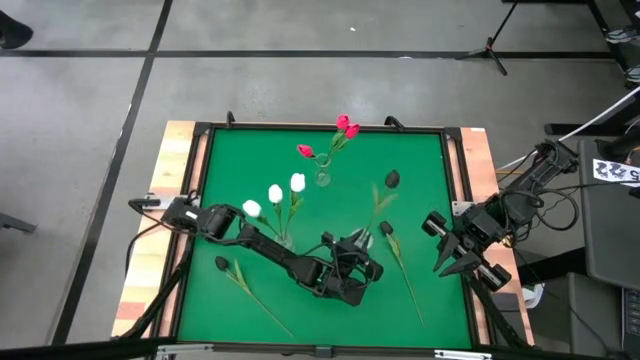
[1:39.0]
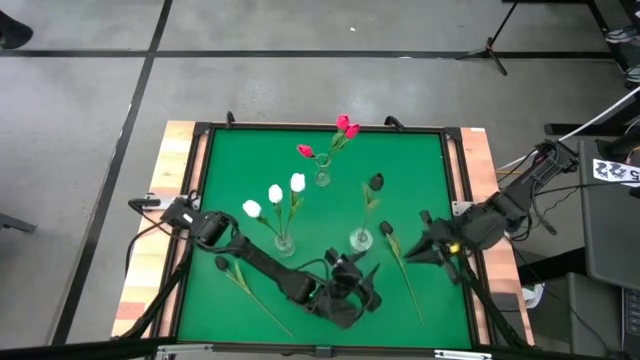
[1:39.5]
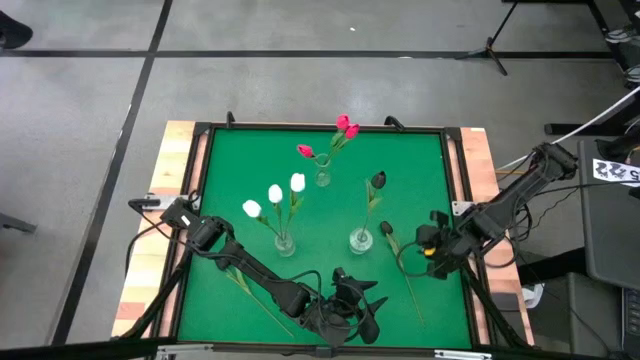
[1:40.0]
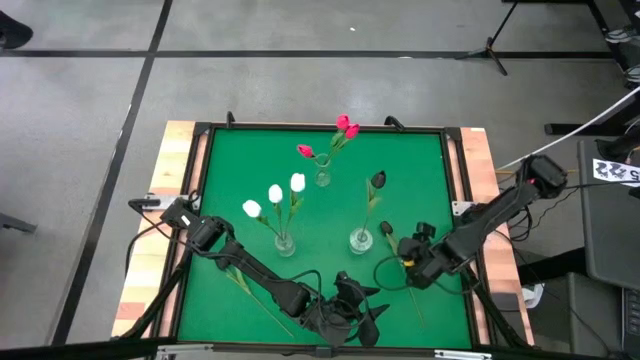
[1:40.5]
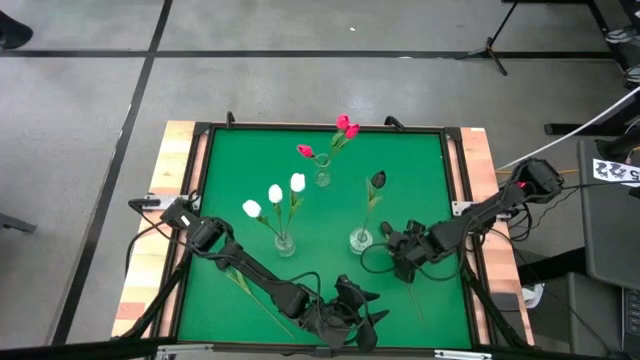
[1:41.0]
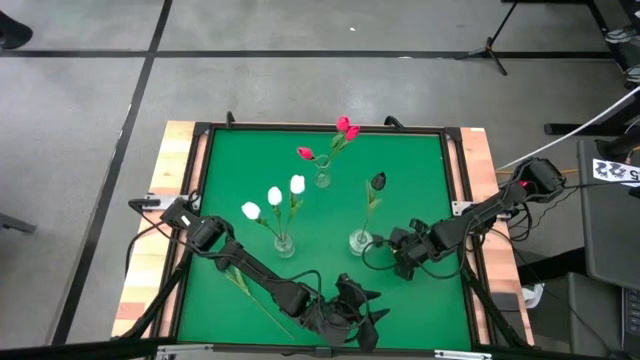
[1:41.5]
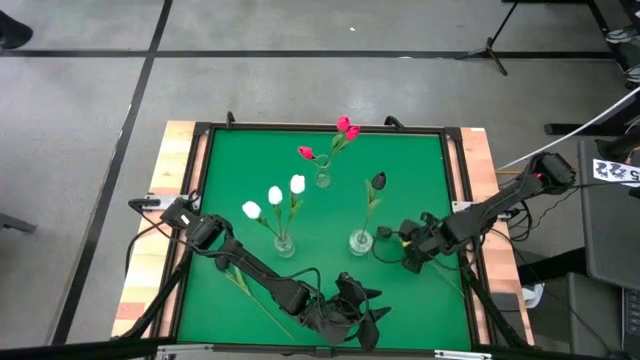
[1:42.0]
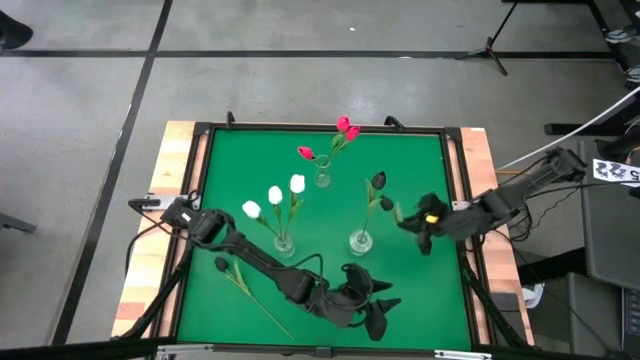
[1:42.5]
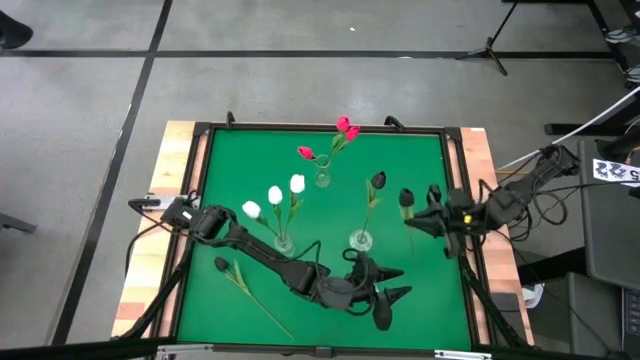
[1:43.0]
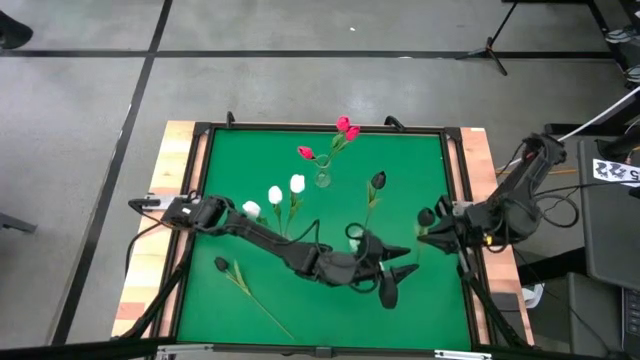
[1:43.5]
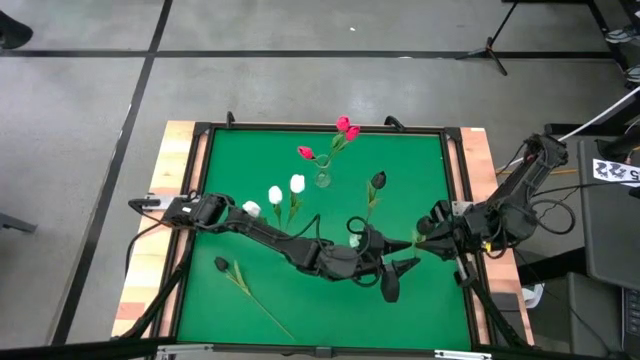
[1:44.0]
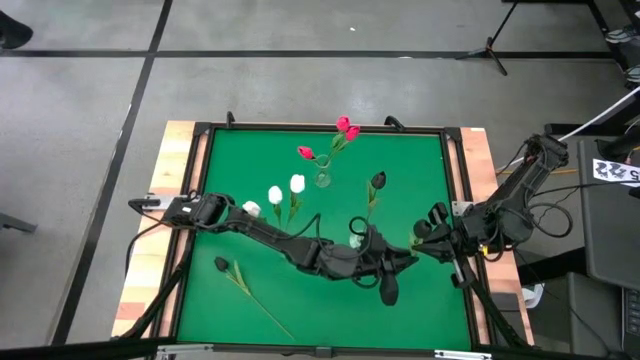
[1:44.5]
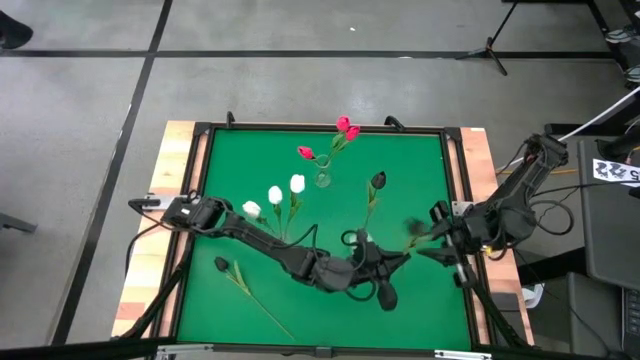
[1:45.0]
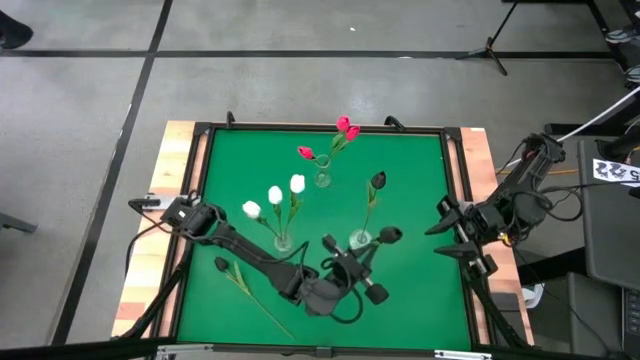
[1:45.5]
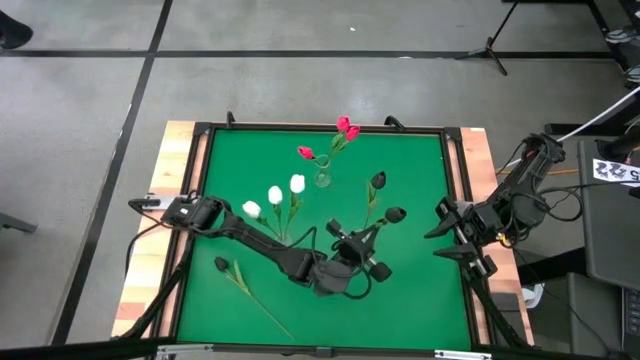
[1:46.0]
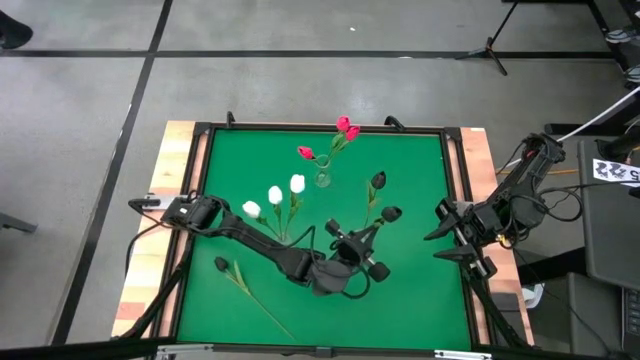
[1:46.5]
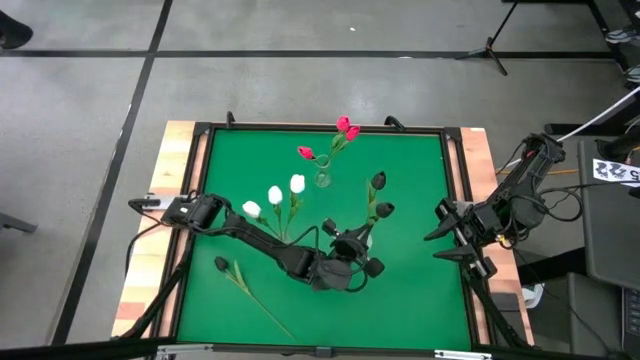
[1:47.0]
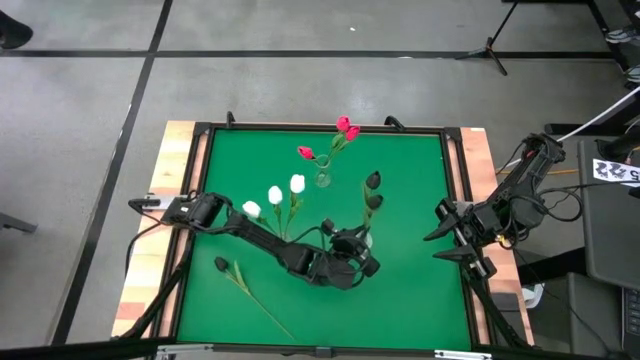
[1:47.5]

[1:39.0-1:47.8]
Task: Sort flowers into vase by color
Put the right black tulip into the bottom right transparent vase

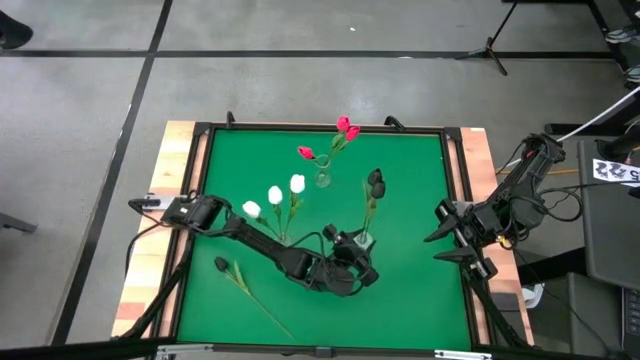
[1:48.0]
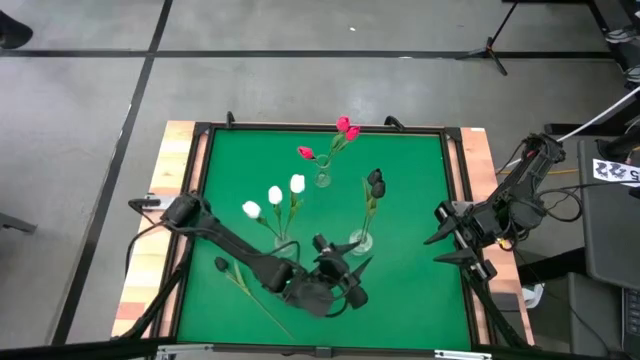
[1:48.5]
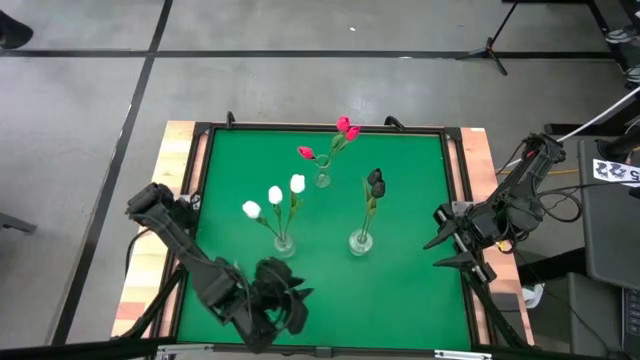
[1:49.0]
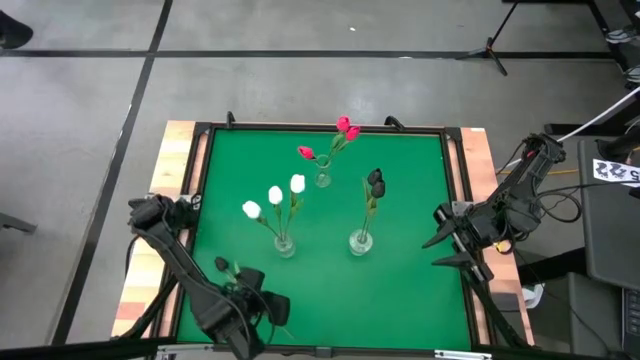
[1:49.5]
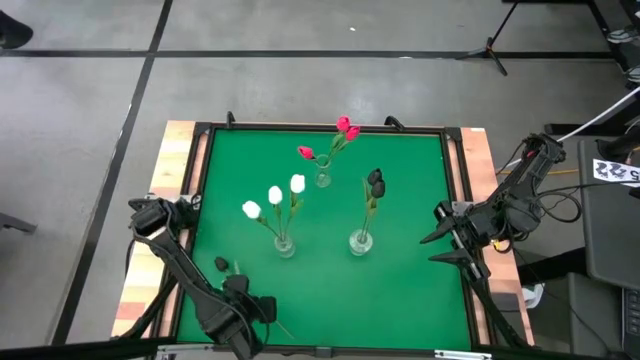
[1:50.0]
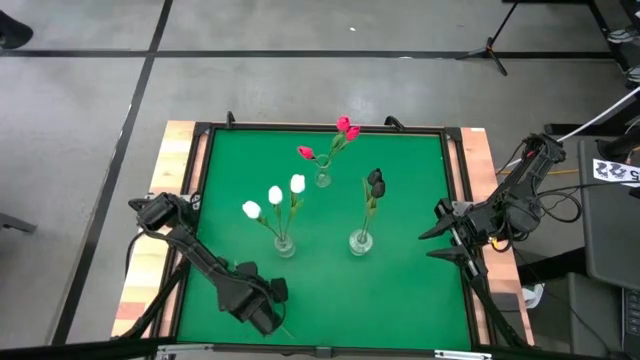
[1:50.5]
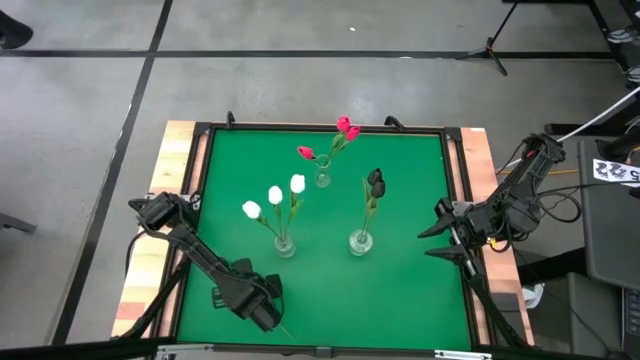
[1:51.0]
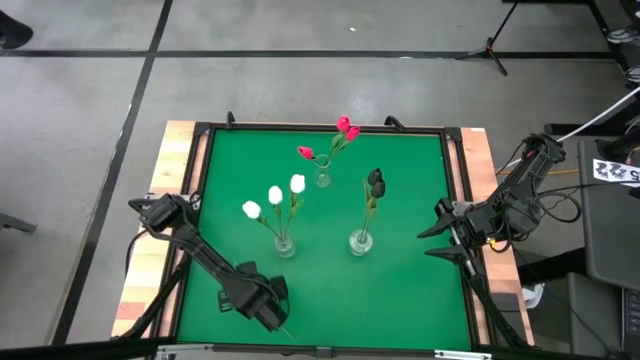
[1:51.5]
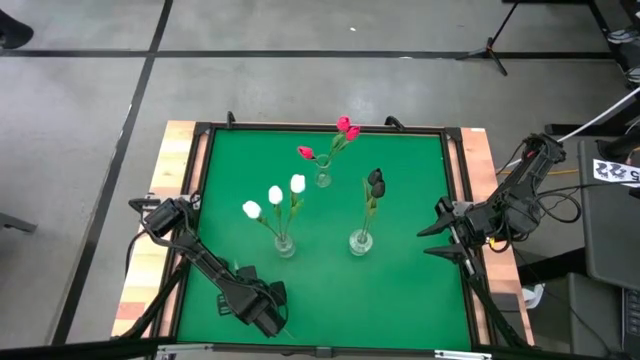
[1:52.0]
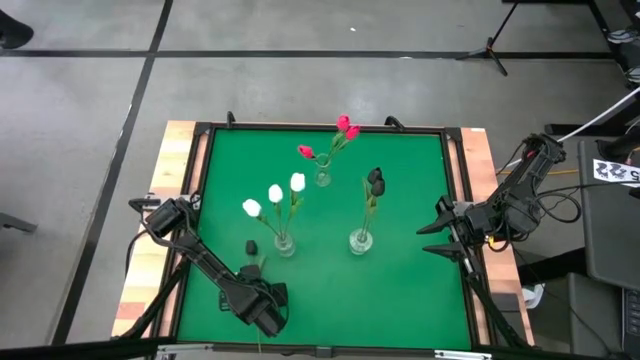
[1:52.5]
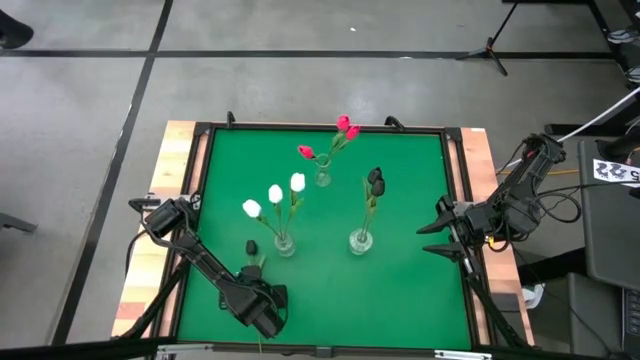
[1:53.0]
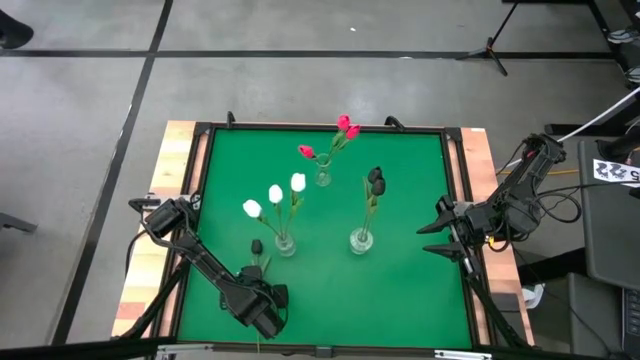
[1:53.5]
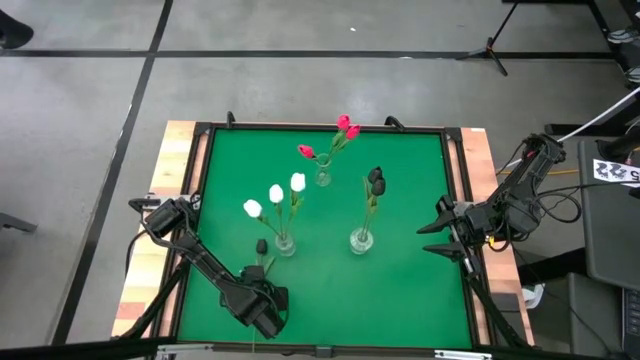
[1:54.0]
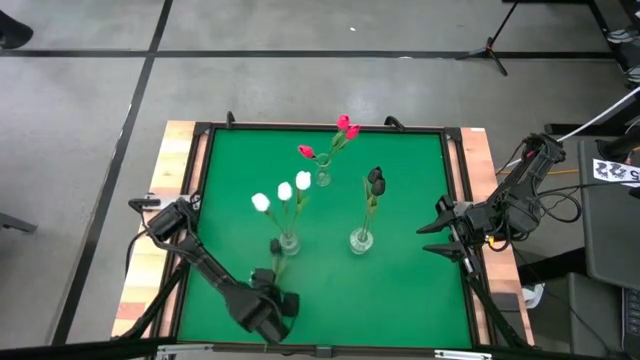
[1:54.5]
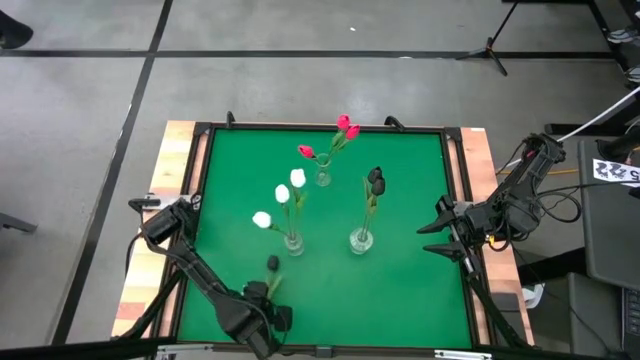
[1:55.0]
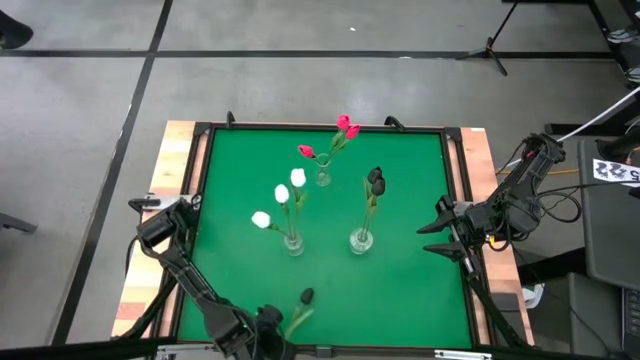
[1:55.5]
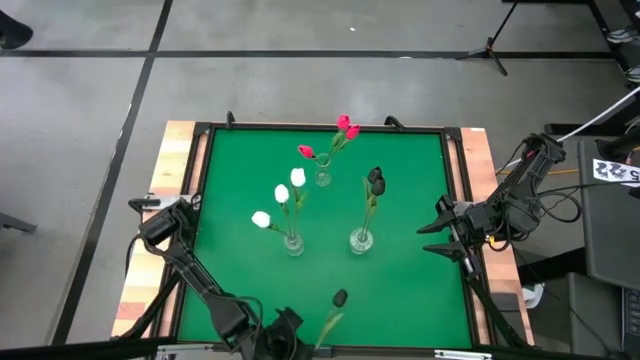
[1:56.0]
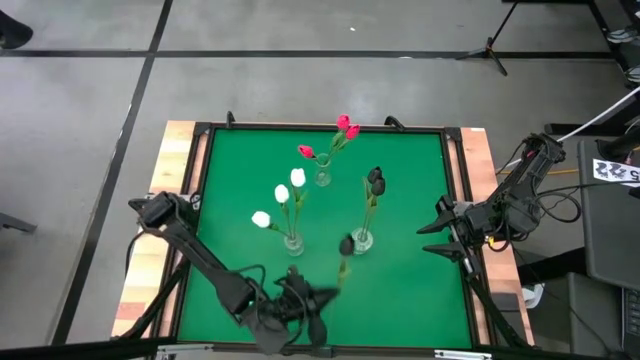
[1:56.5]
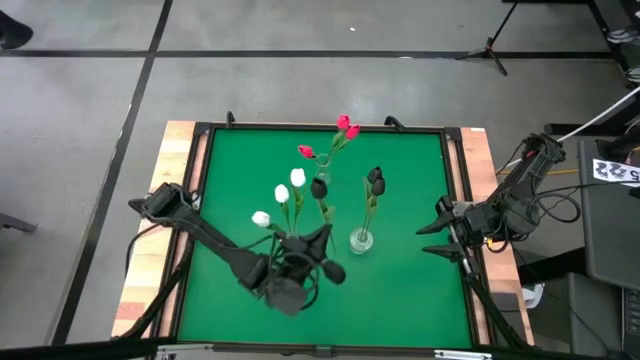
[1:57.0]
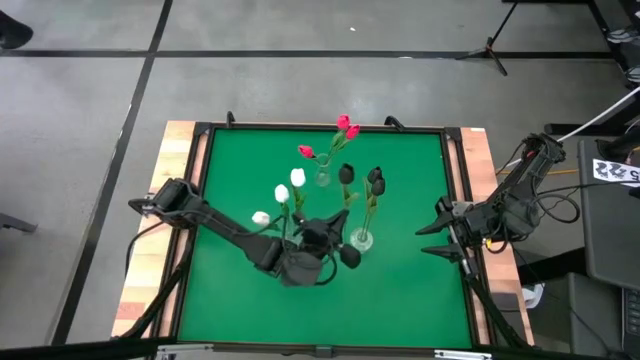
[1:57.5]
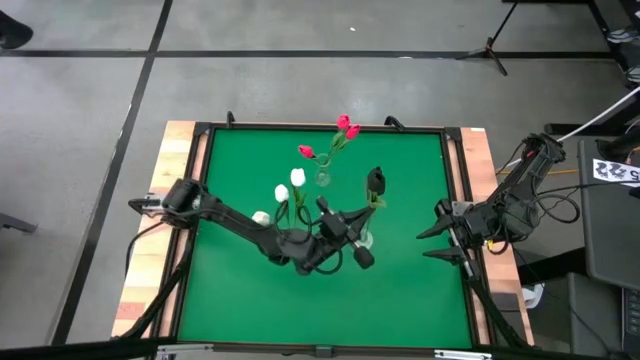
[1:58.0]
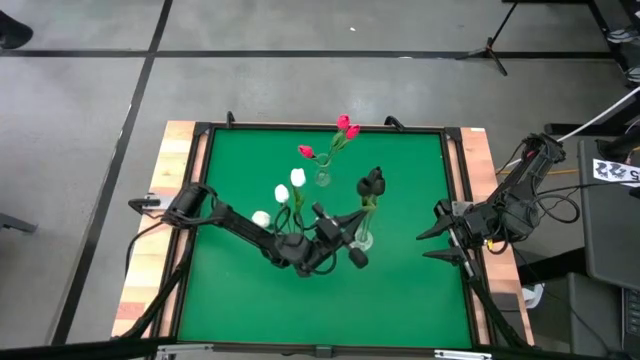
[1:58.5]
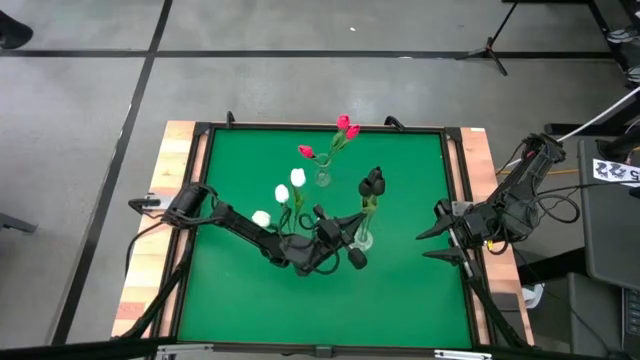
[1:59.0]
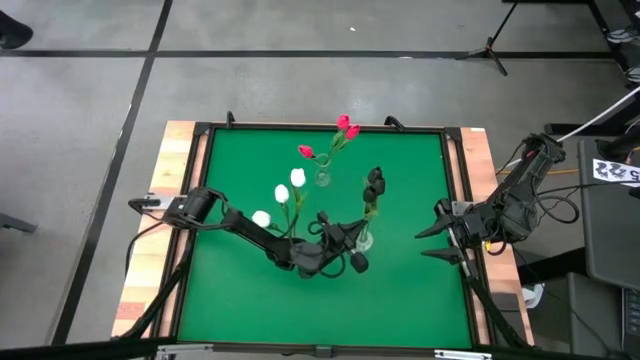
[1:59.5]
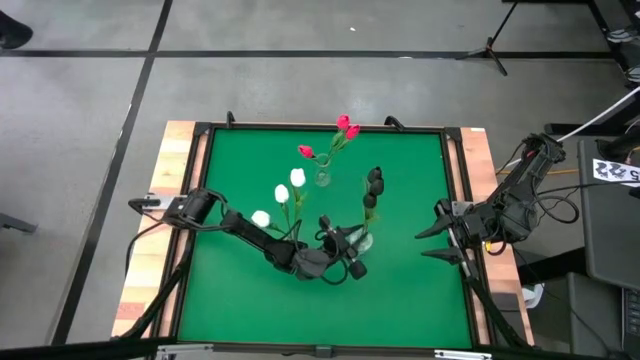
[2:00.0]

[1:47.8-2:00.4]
Put the black tulip into the bottom right transparent vase
